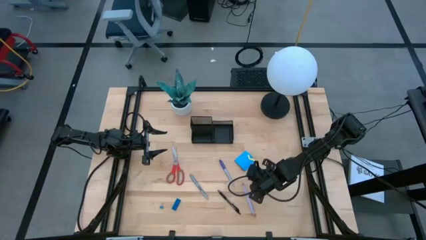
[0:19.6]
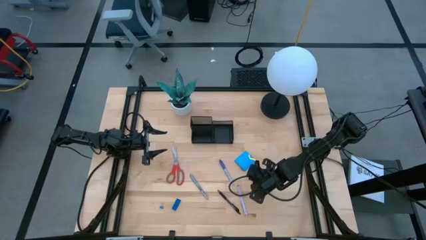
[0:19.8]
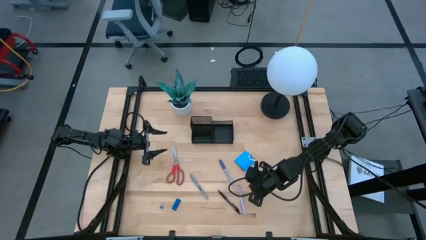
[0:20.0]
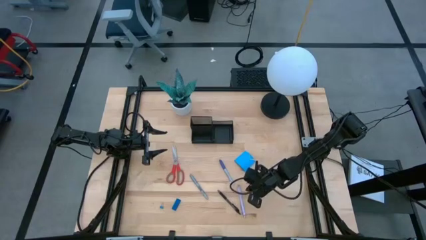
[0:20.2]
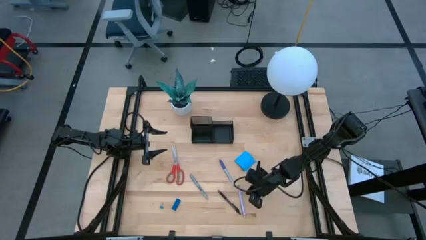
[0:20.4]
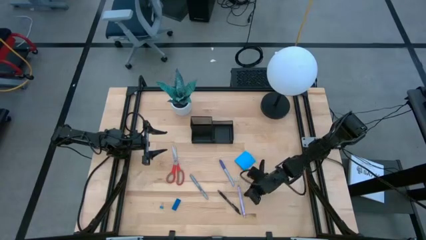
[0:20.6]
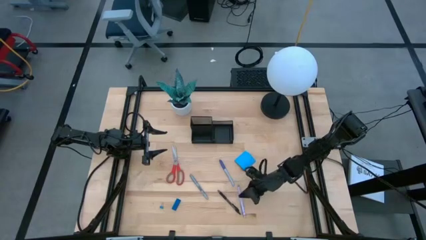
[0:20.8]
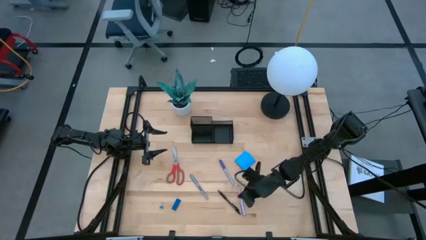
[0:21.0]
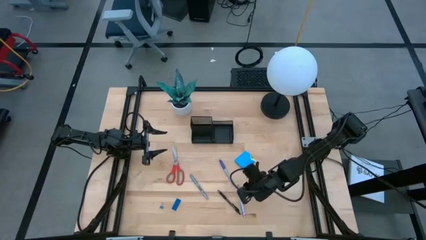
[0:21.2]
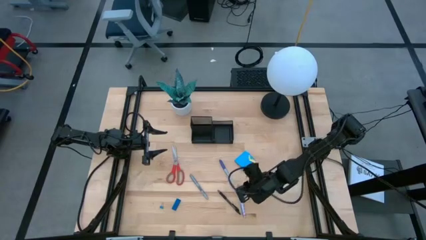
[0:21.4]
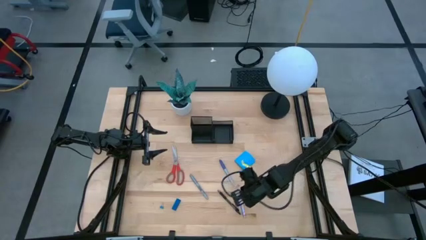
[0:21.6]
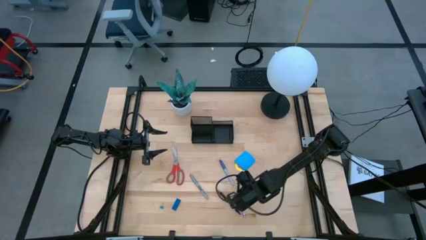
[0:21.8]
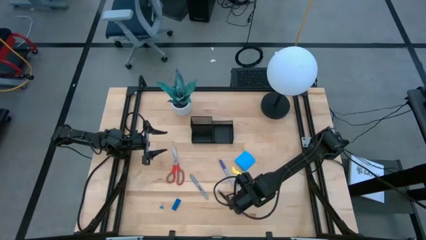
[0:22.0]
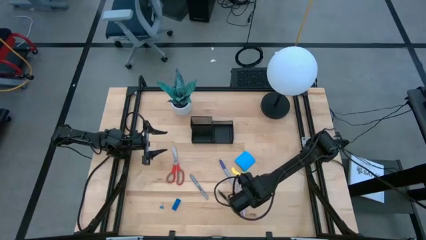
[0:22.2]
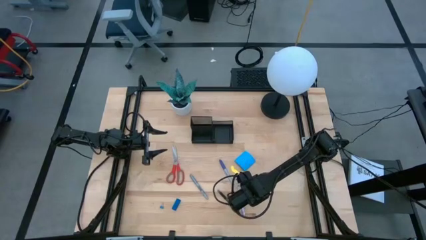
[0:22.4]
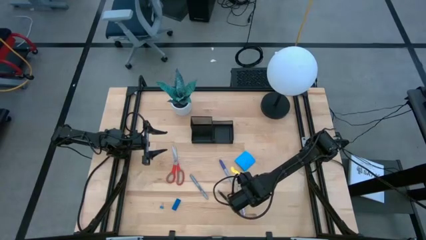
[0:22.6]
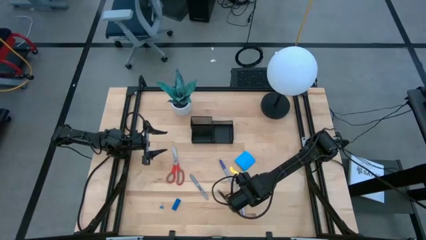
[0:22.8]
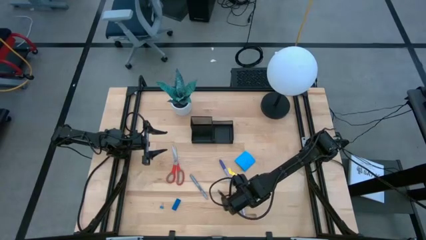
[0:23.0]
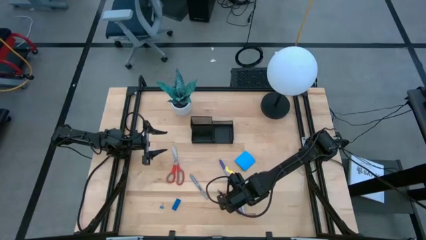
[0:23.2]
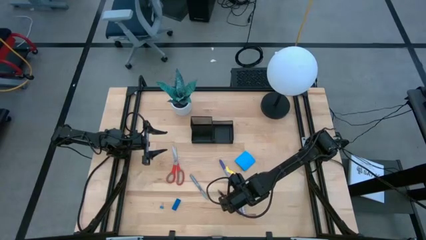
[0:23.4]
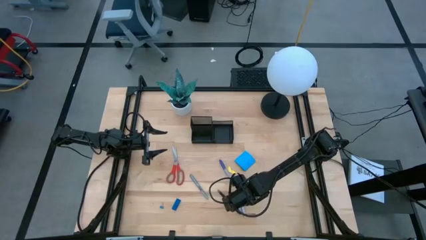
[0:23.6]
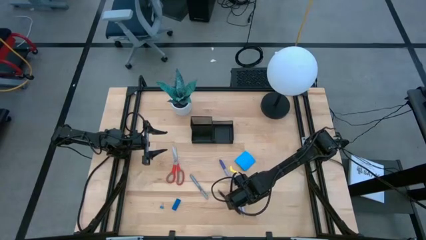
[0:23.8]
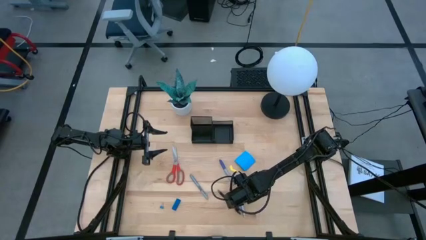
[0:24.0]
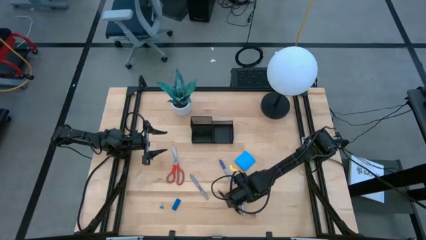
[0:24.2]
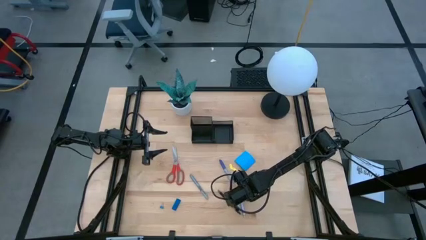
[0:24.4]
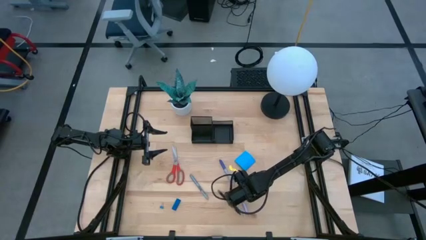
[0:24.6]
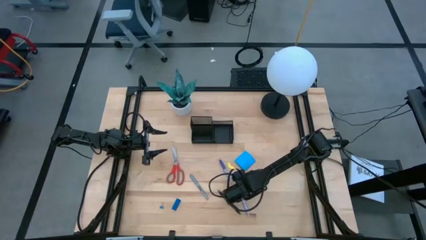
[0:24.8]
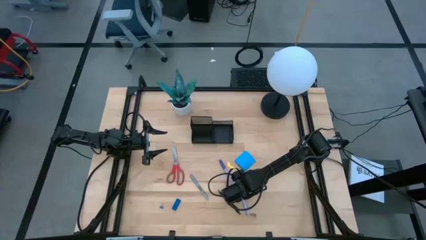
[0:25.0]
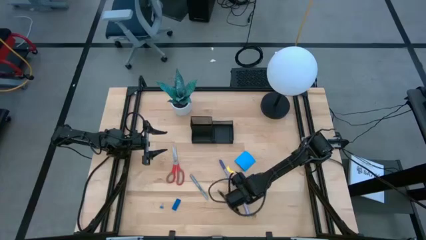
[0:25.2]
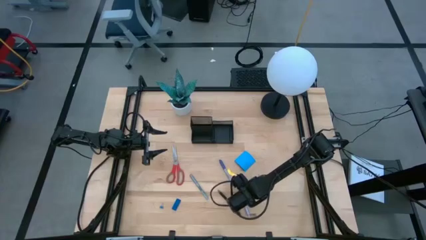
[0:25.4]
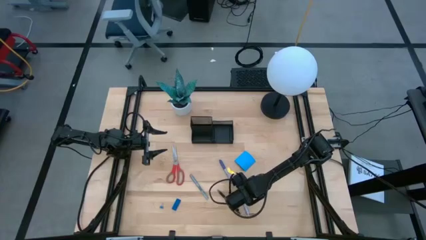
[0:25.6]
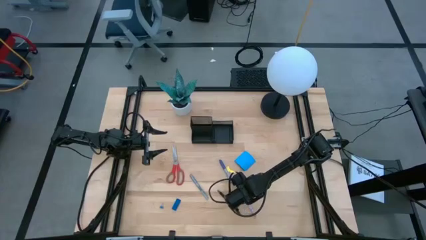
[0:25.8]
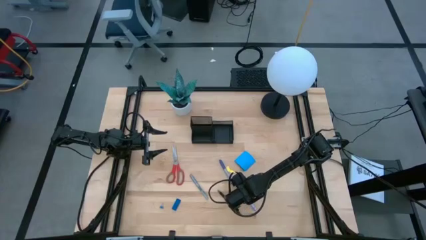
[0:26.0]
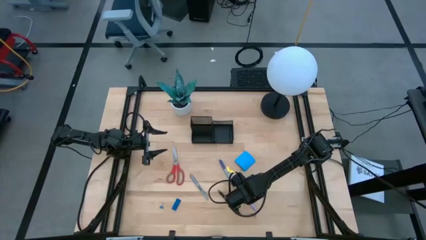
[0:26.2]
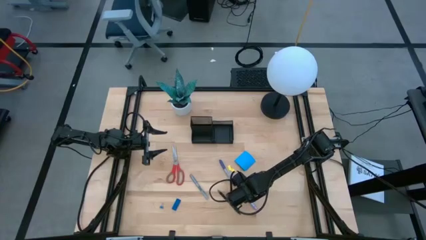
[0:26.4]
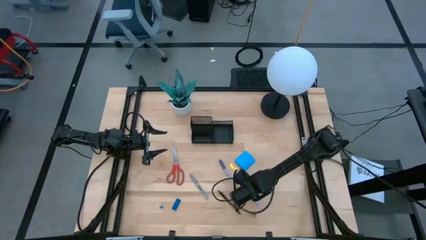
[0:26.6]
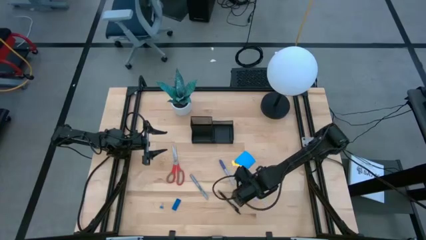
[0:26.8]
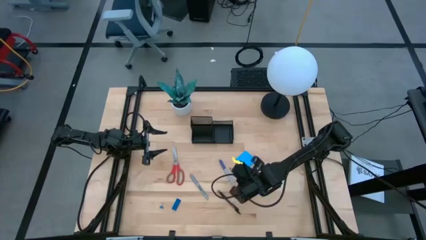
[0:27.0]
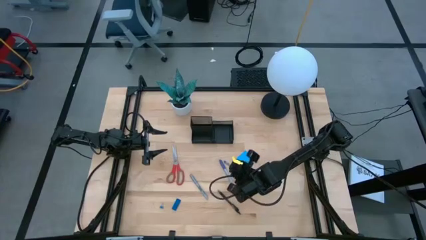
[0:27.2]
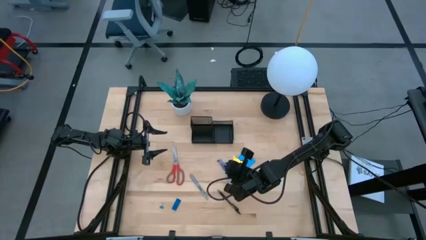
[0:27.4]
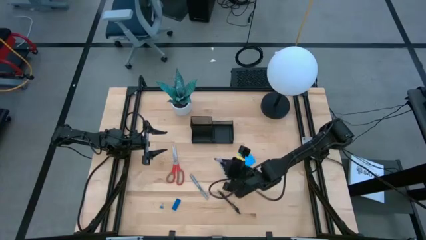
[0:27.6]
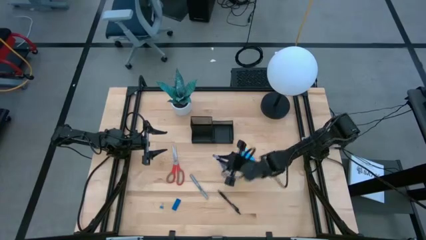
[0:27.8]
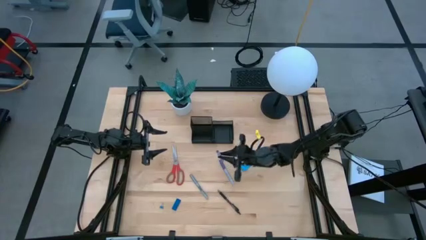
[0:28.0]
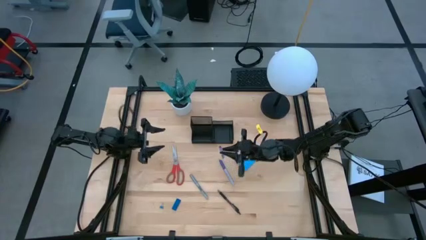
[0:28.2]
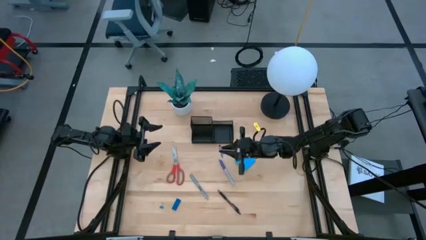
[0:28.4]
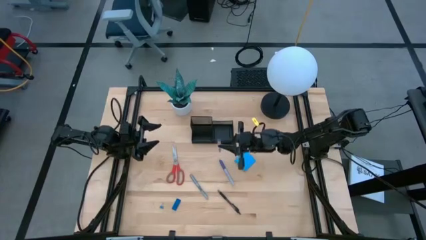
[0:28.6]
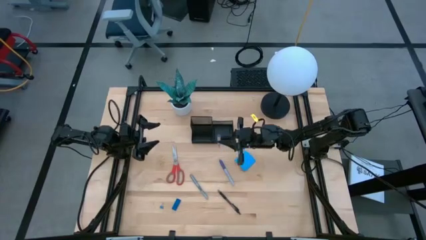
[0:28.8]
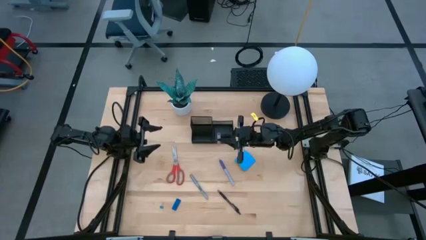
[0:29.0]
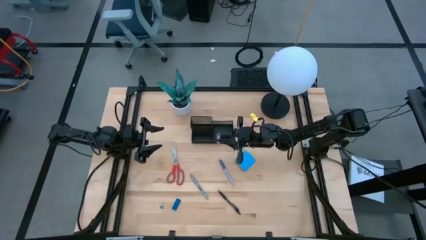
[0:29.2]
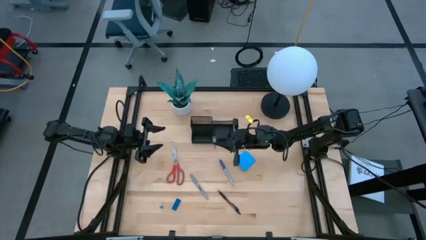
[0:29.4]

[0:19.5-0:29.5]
Task: Pick and place office supplies into organizer
Put the purple pen into the black desk organizer

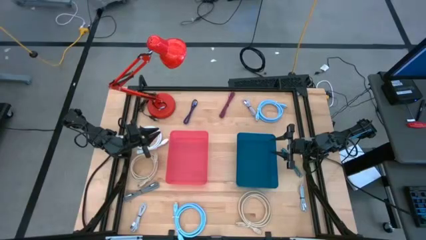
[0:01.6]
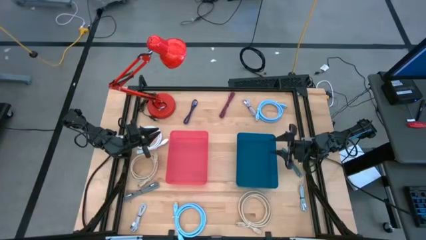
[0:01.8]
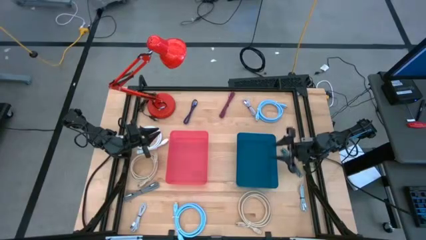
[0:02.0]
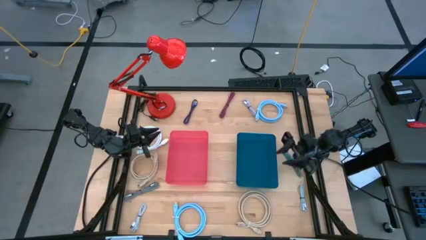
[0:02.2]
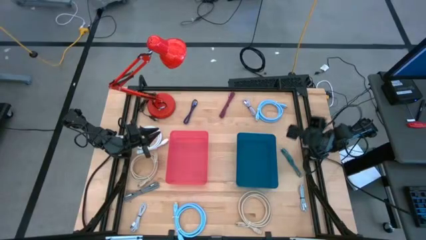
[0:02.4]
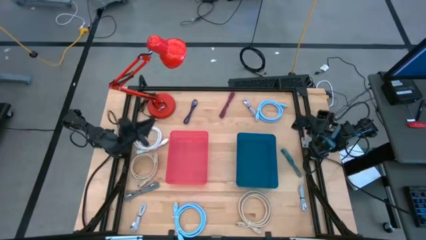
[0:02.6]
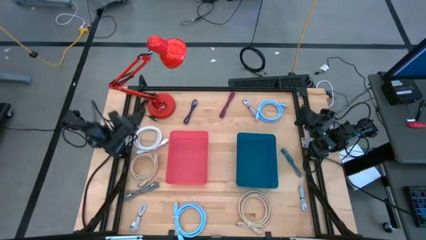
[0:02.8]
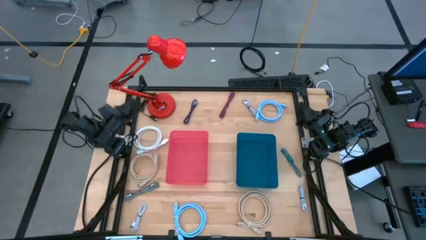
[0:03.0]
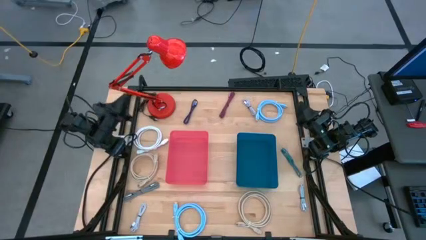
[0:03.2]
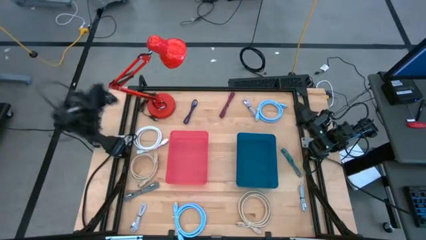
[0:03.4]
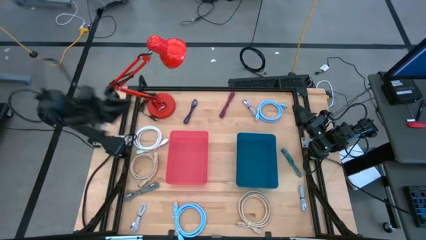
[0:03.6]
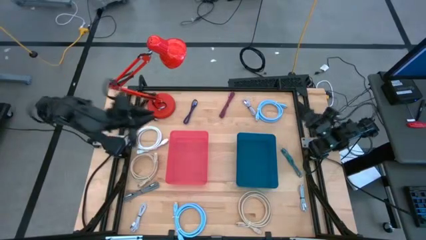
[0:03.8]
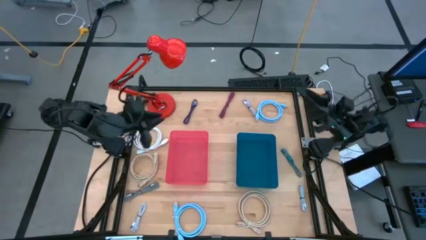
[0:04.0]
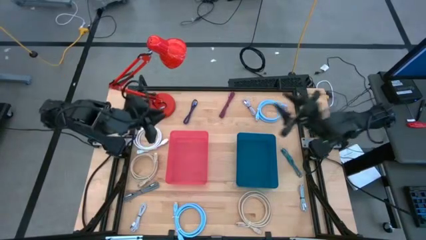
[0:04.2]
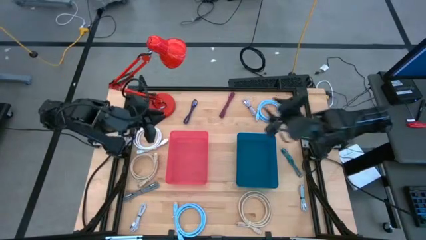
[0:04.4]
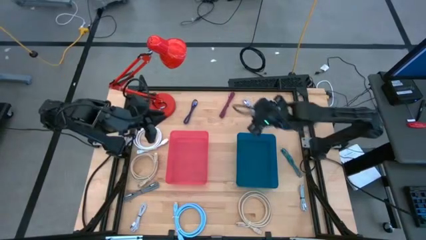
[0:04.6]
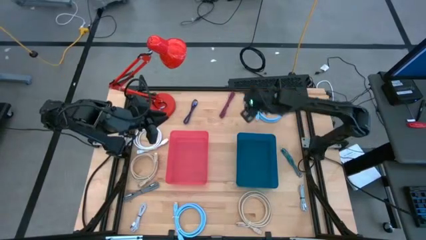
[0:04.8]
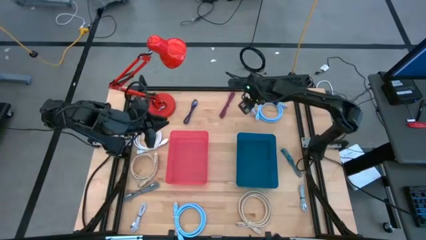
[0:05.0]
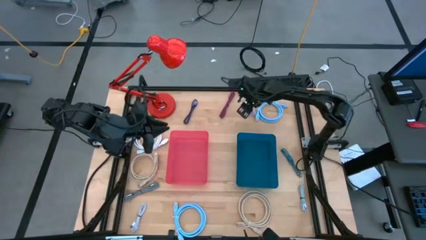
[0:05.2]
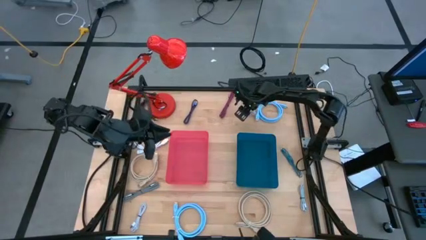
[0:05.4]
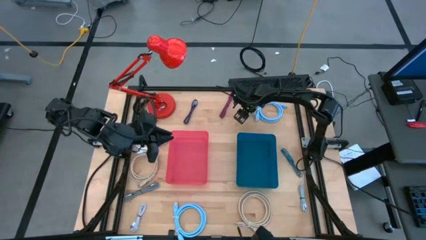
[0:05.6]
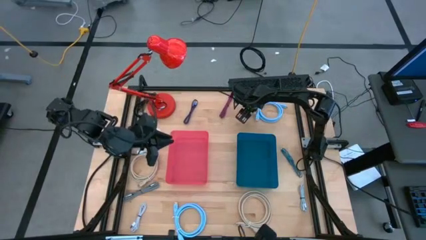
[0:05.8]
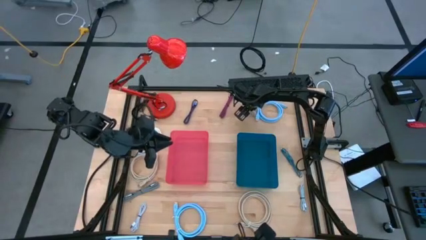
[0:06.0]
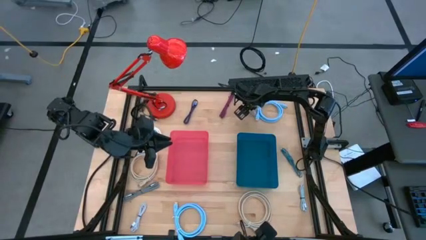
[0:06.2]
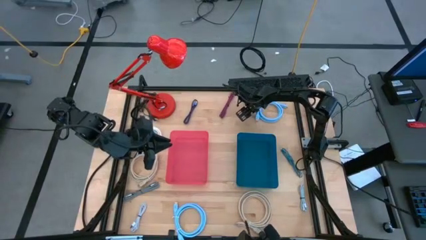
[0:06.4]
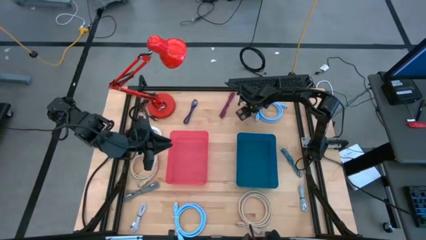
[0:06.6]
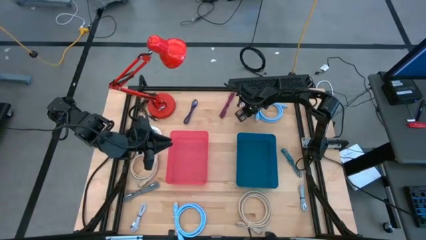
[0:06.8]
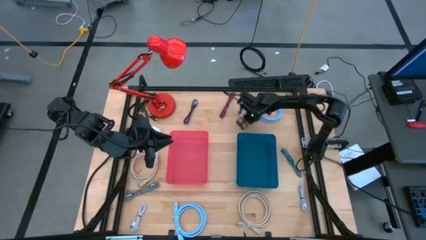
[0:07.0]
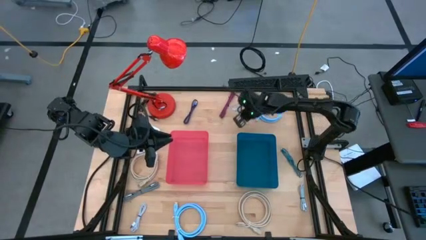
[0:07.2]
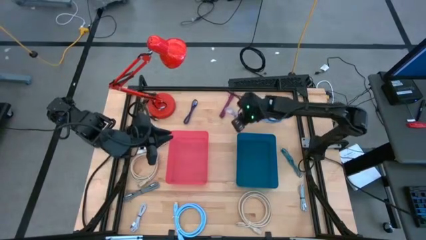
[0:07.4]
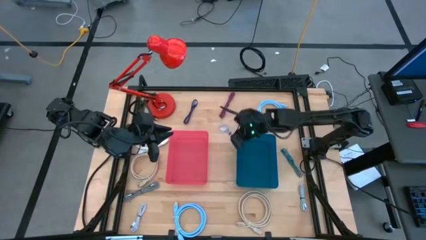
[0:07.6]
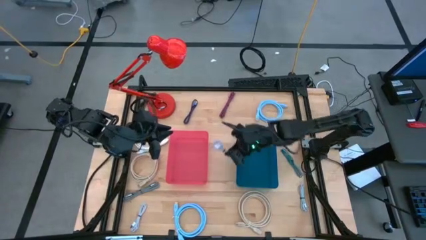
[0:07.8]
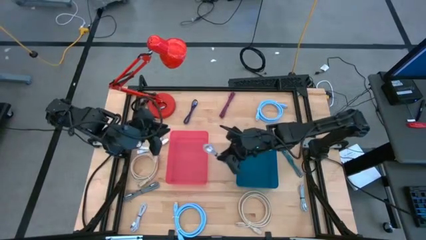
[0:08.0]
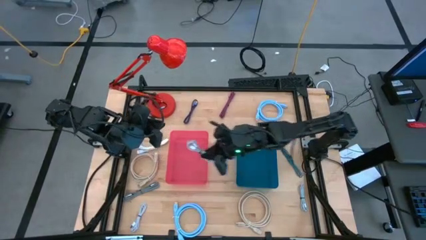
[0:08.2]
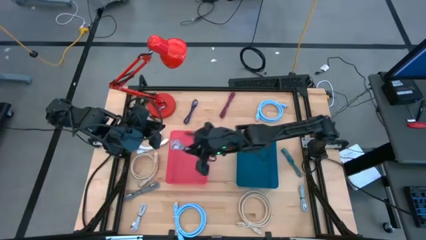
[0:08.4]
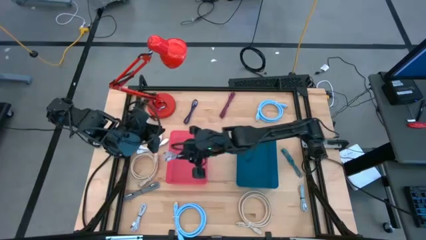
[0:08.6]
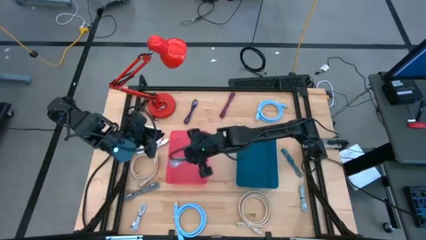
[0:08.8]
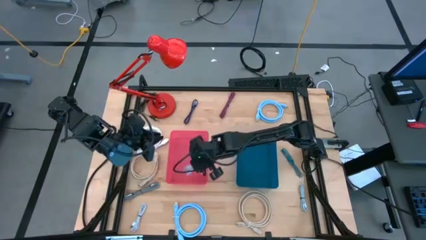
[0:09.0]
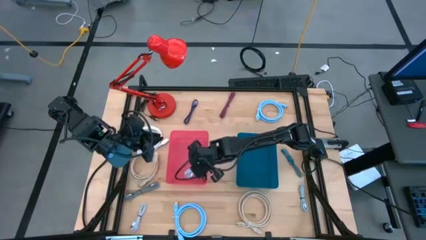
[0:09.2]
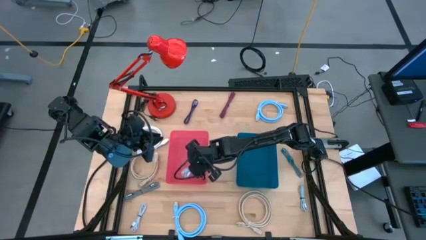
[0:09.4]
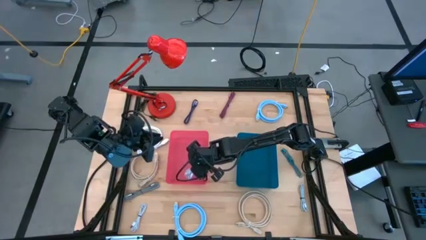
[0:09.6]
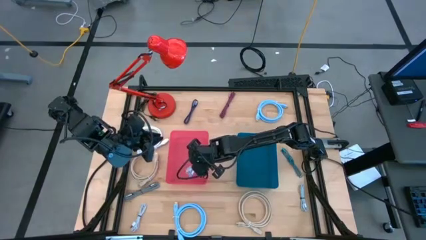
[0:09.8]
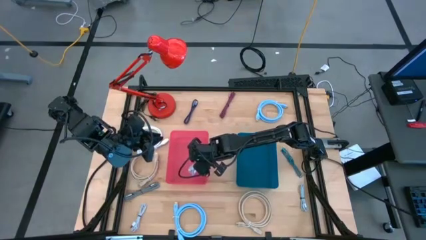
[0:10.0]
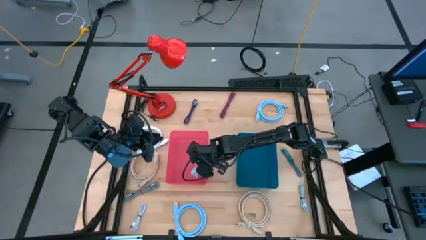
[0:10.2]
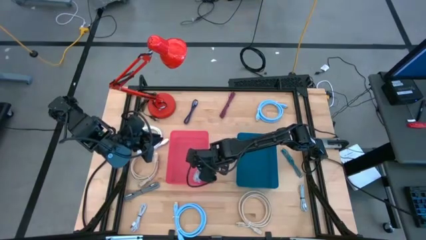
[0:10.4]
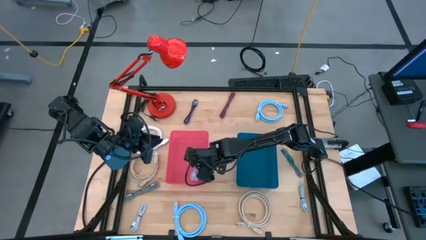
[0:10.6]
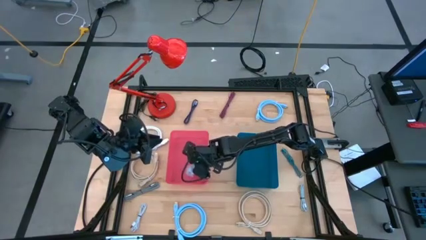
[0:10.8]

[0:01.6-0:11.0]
Task: Pick & Place USB Port
Put the top white charger cable into the red bin
